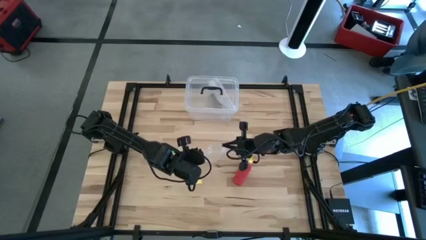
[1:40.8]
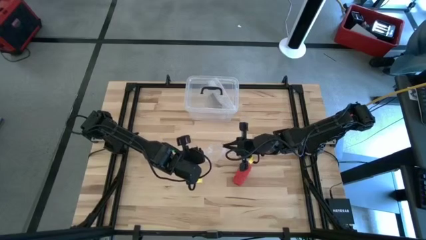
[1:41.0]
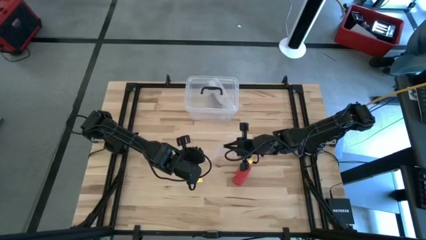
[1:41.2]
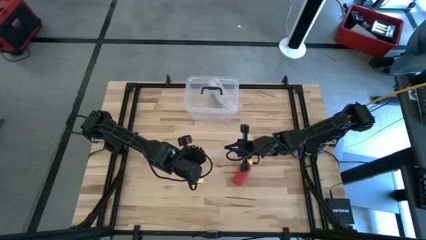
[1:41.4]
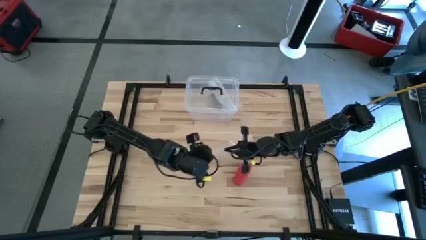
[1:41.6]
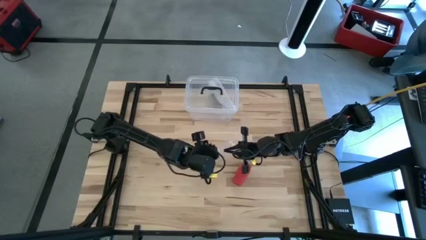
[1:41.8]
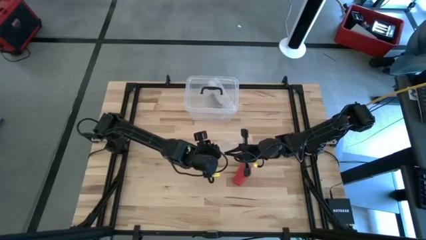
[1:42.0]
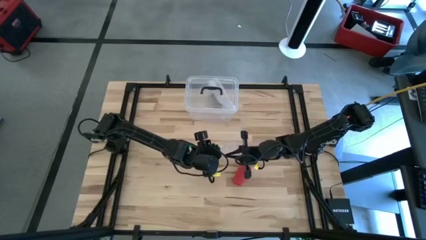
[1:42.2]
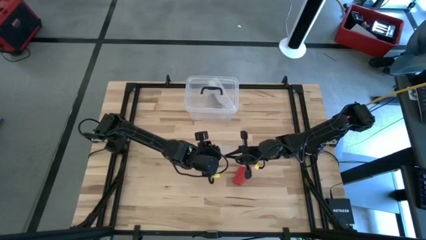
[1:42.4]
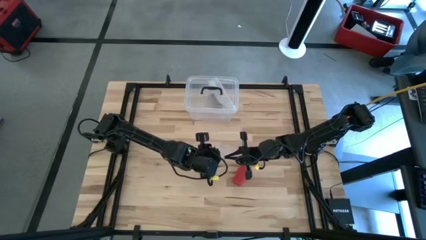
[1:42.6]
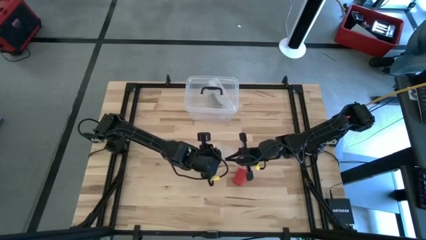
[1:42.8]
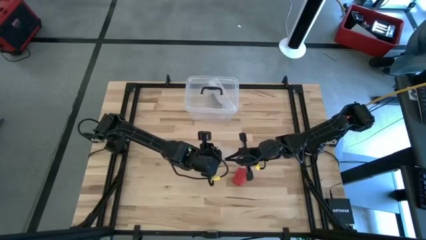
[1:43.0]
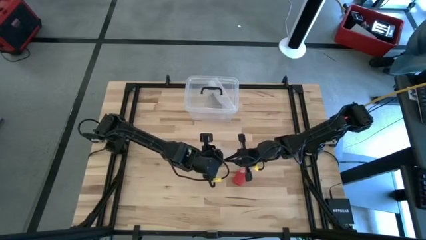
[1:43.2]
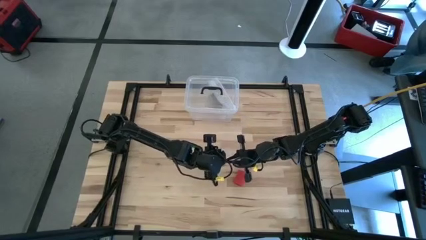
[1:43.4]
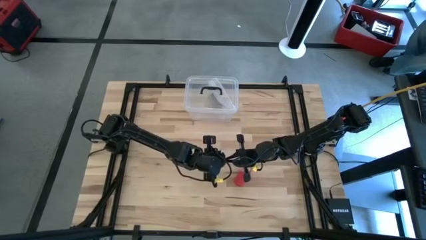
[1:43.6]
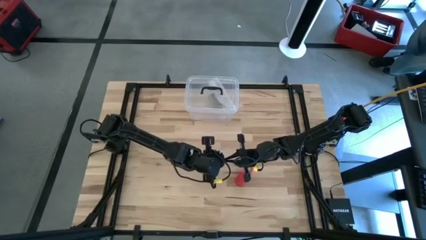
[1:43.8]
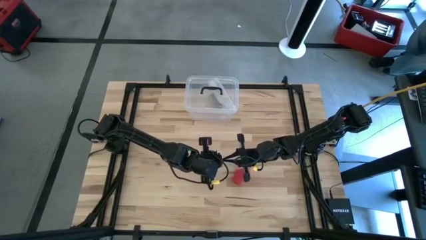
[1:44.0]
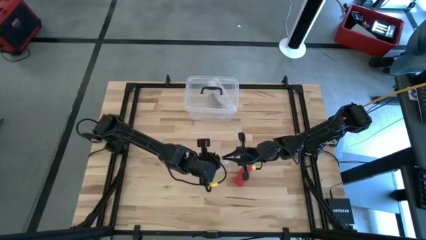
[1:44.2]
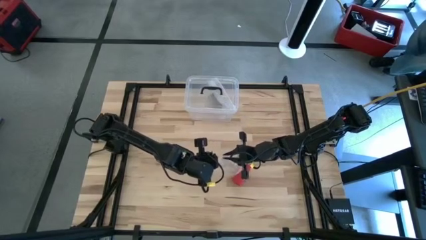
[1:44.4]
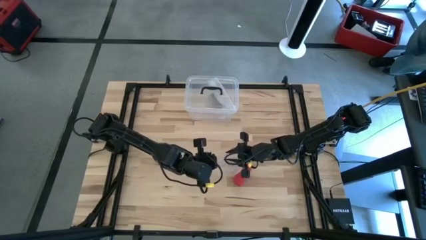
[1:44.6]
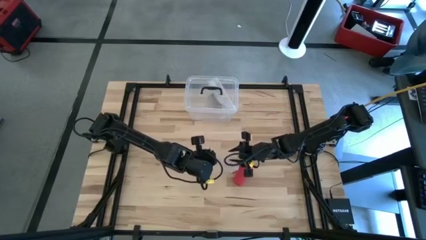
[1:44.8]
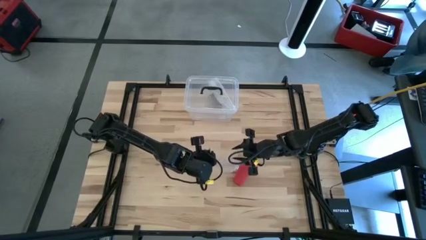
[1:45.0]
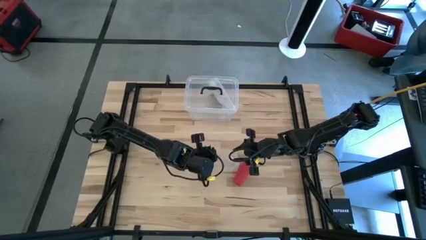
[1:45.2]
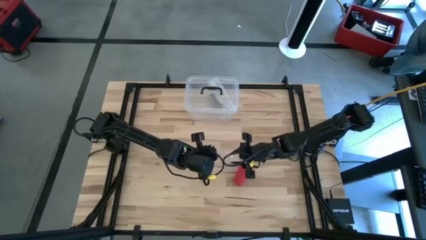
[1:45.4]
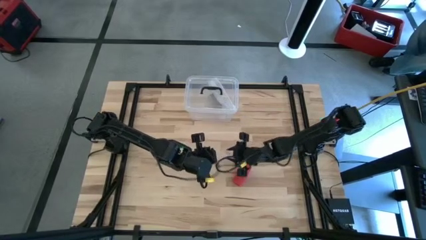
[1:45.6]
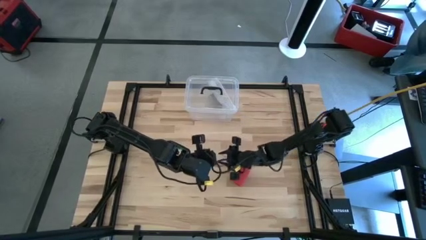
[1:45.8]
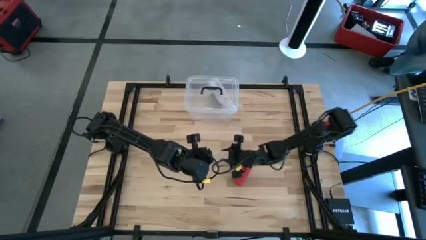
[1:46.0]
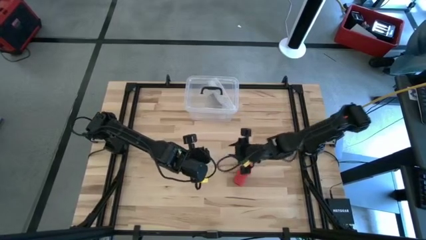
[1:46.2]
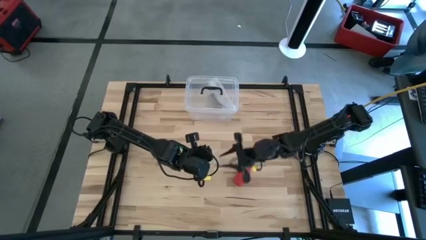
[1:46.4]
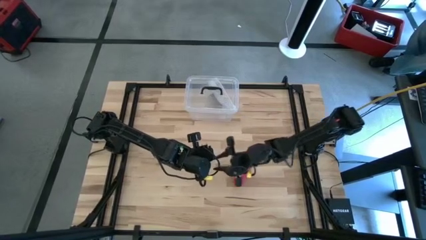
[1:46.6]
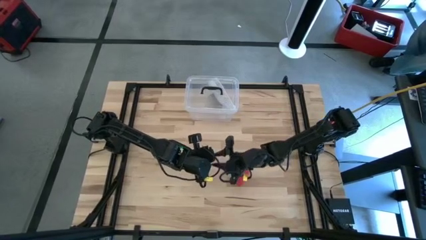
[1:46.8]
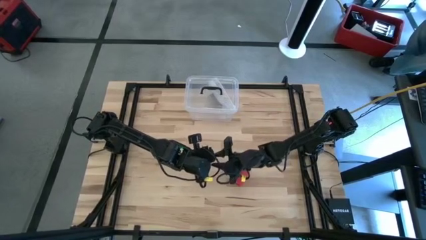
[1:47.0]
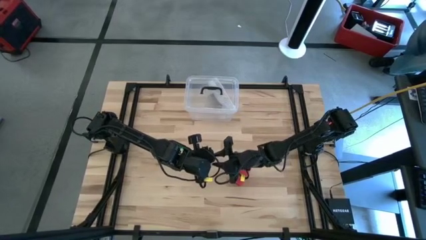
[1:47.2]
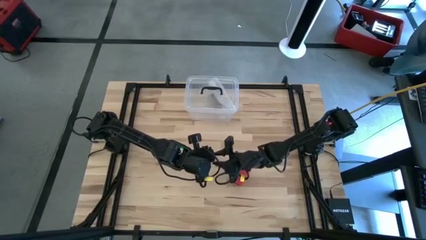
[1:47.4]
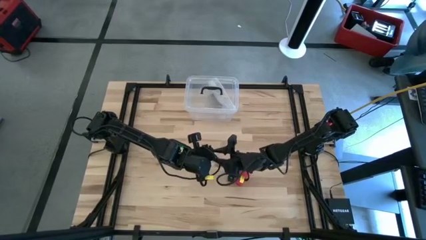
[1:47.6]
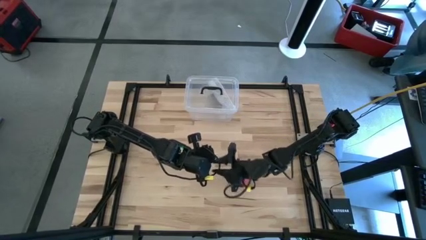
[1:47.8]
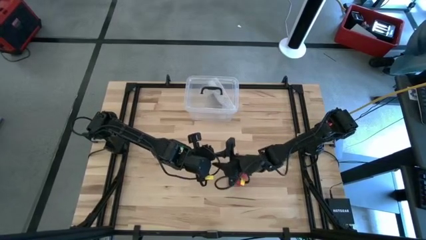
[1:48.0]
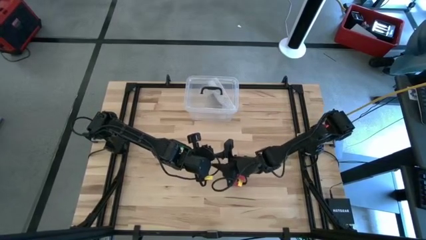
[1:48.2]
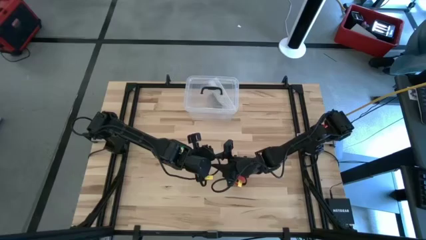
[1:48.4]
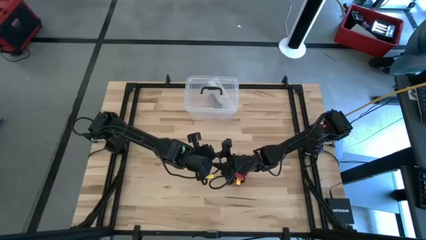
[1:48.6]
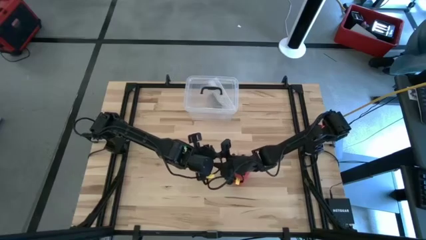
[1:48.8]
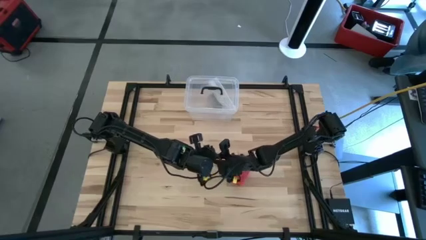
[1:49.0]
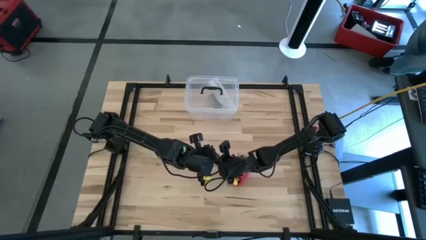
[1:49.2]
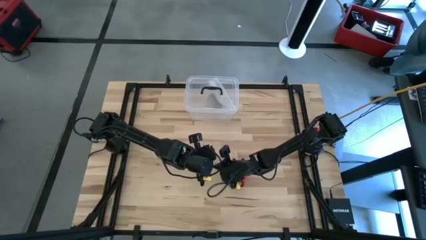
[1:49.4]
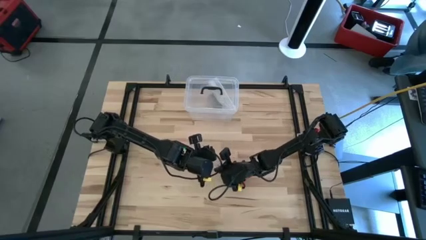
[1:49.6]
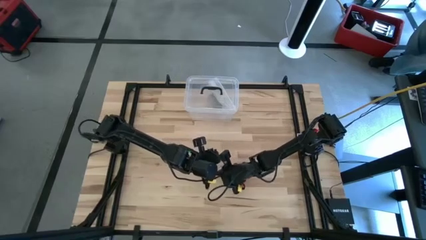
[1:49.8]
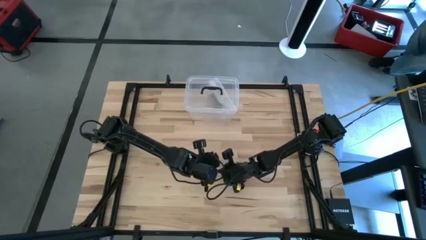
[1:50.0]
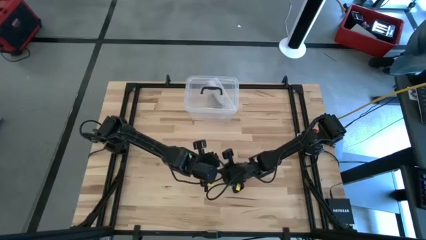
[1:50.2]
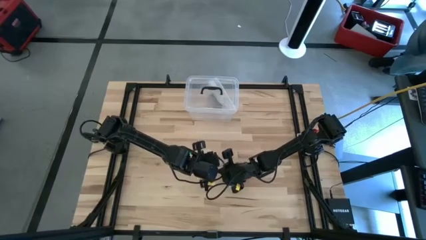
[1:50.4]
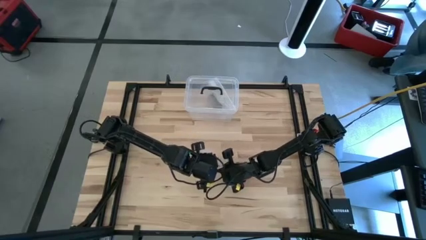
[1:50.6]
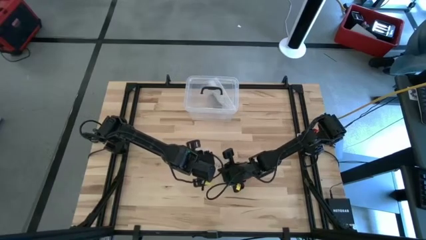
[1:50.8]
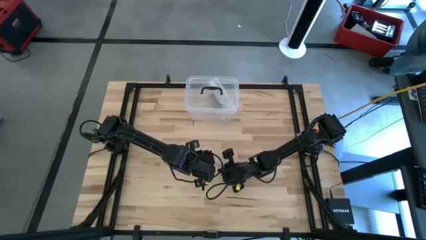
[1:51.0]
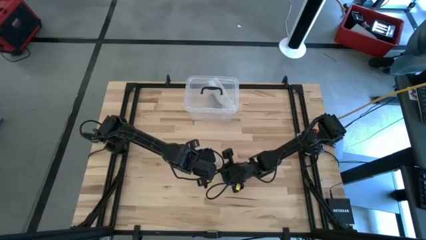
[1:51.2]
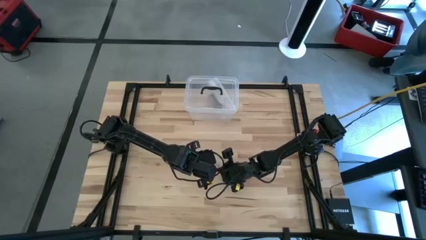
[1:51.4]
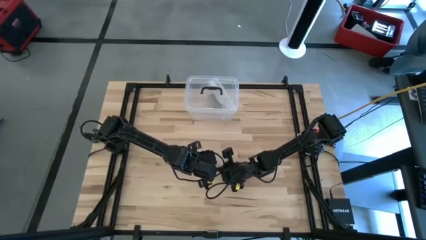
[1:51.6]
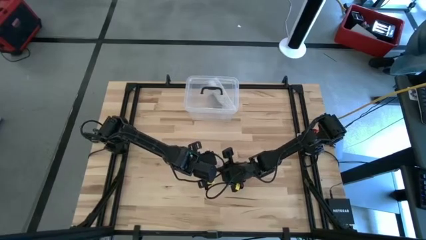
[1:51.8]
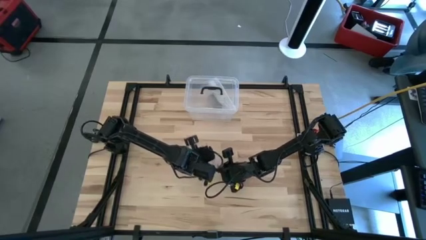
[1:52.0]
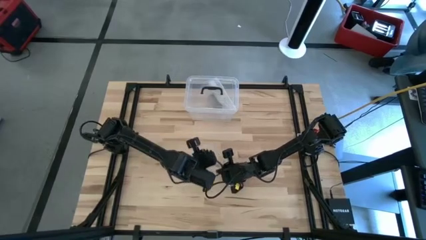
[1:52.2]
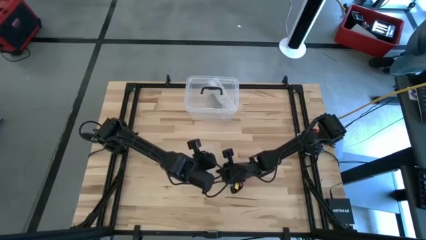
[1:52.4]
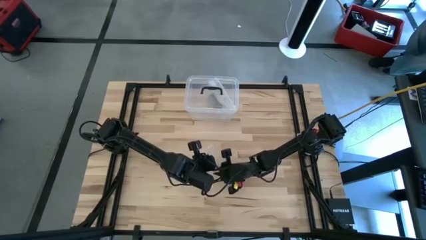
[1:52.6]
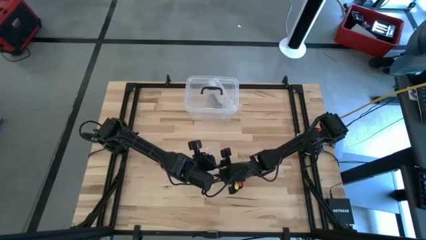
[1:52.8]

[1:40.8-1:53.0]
Task: Roll bandage
Open the transparent zip bag

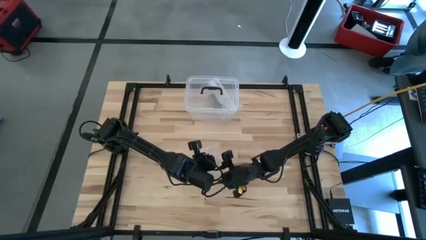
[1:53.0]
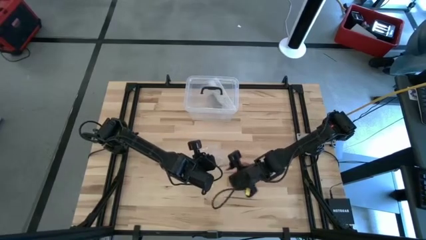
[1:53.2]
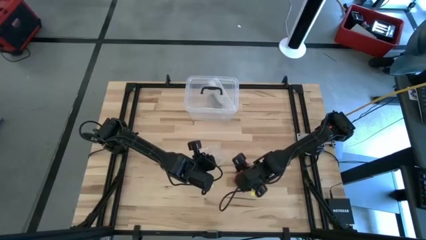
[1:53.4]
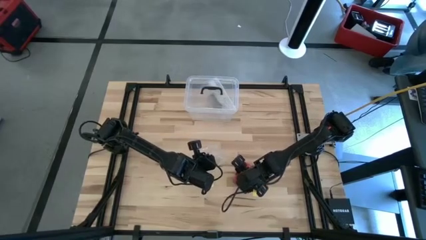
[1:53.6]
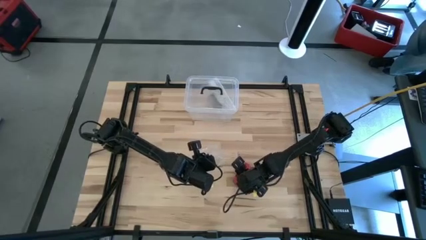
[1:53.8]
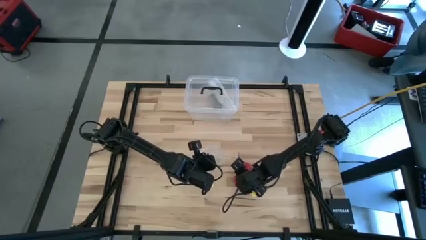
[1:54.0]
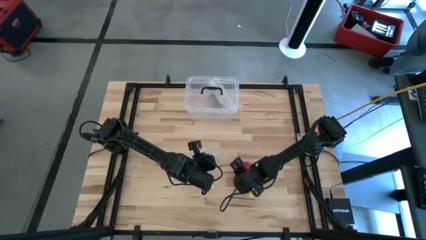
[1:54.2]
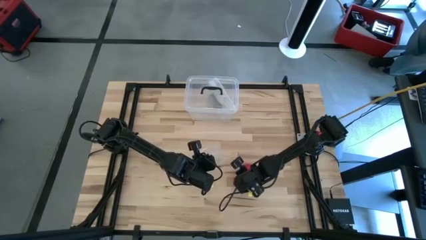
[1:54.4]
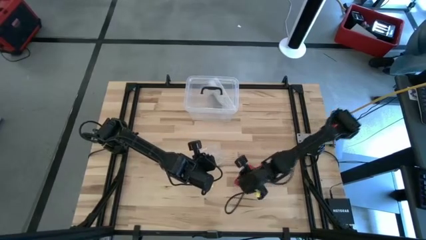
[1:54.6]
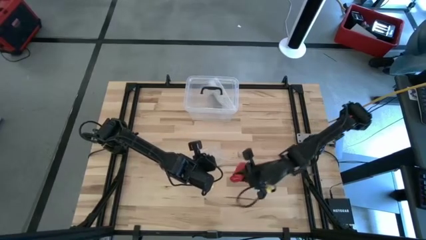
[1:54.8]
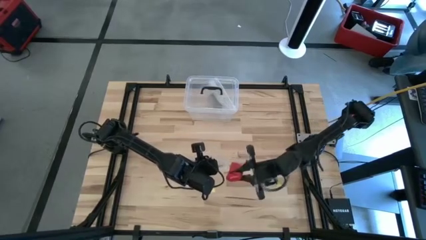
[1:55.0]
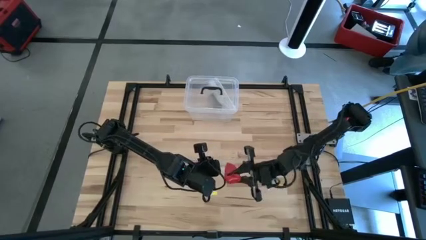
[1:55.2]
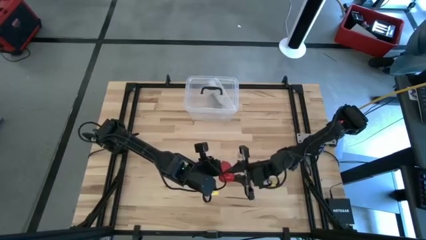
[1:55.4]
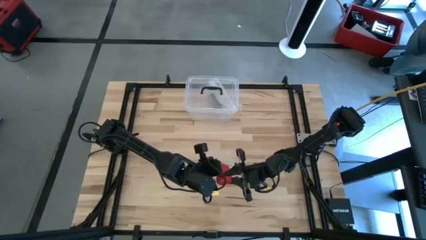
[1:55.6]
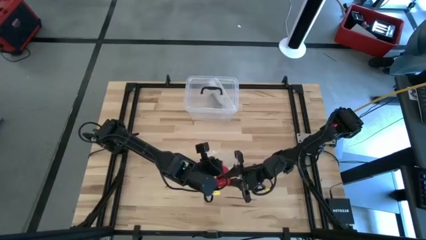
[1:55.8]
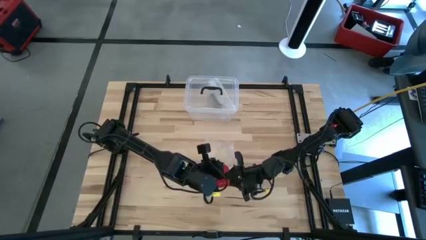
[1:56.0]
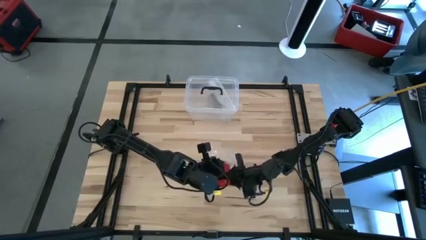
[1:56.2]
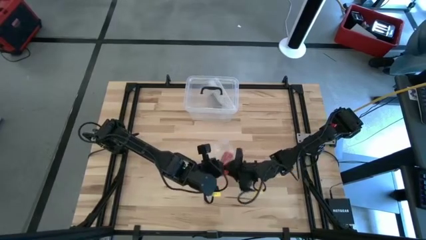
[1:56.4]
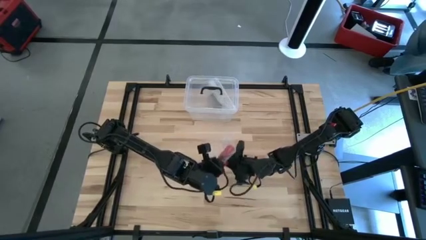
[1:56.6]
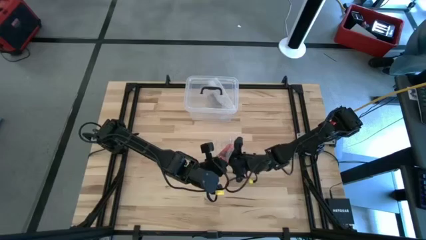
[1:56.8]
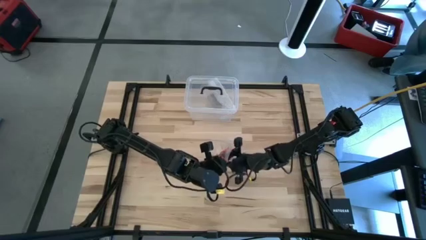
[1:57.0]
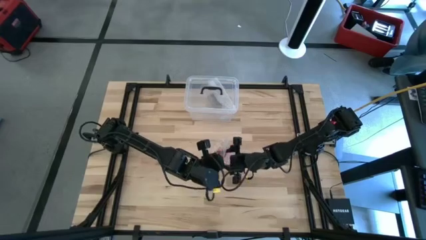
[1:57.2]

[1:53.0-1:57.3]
Put the red bandage into the transparent zip bag
